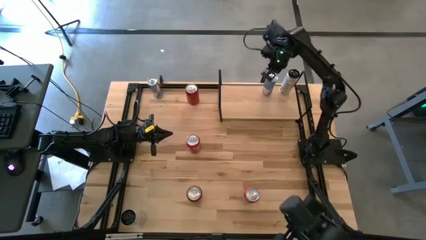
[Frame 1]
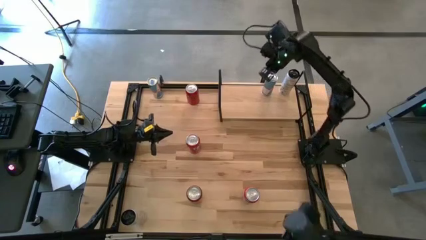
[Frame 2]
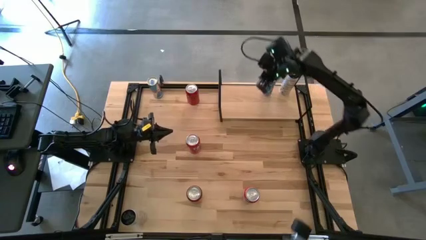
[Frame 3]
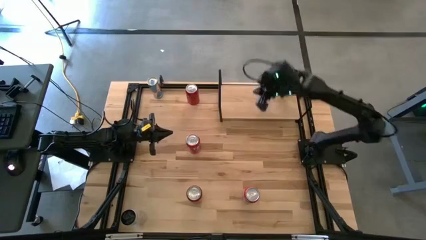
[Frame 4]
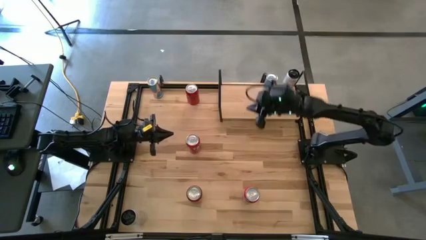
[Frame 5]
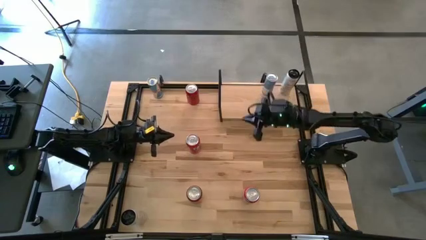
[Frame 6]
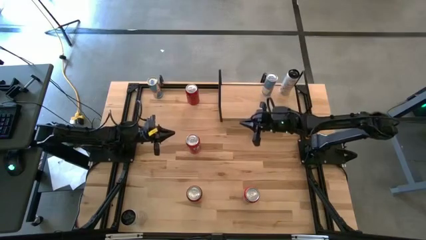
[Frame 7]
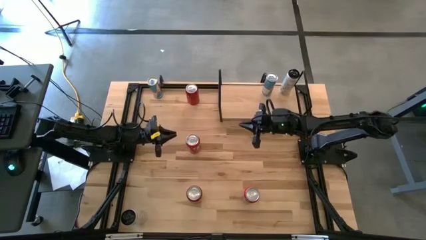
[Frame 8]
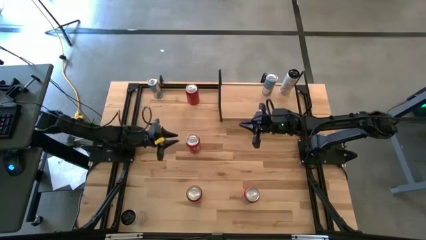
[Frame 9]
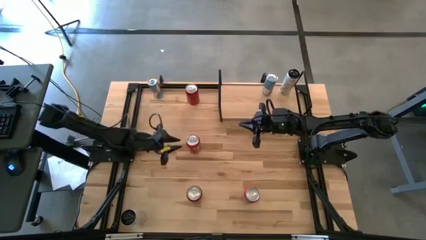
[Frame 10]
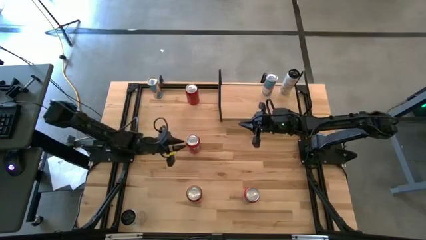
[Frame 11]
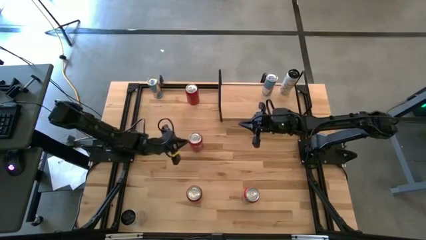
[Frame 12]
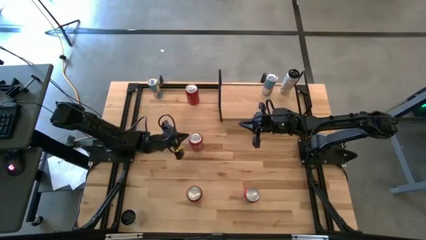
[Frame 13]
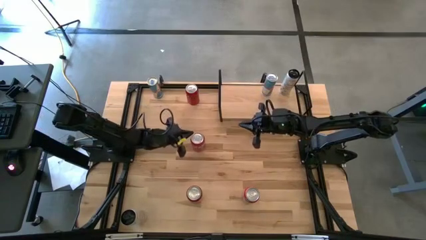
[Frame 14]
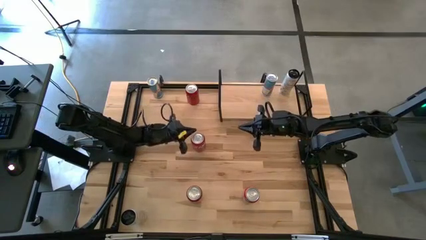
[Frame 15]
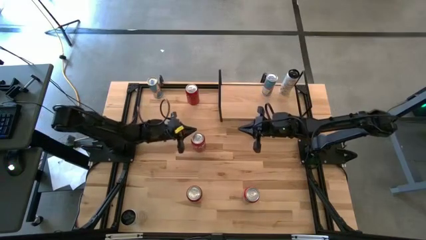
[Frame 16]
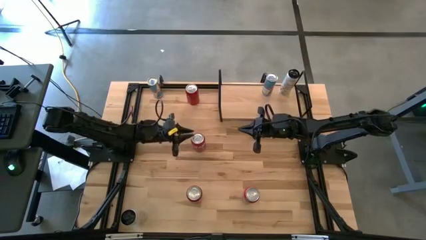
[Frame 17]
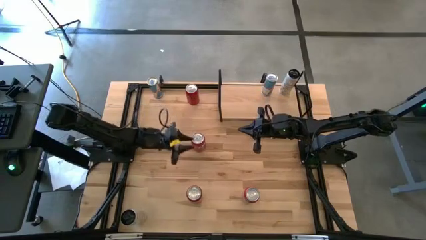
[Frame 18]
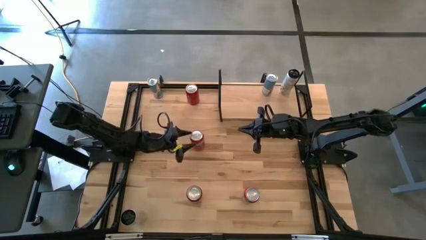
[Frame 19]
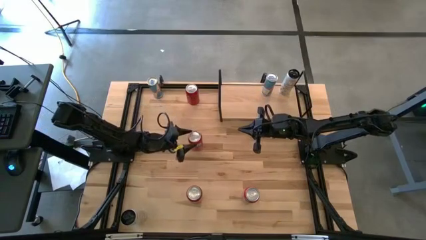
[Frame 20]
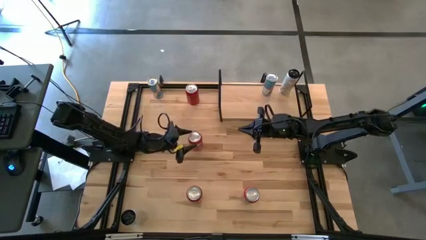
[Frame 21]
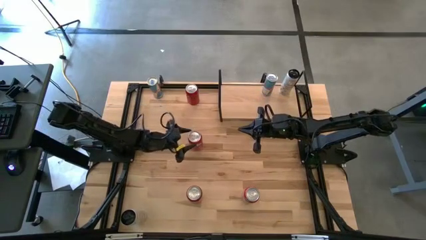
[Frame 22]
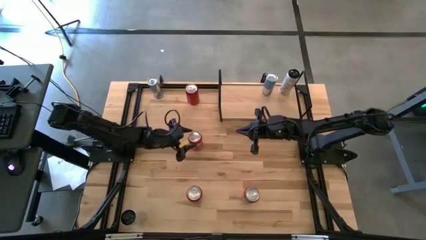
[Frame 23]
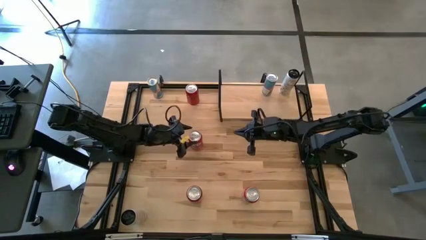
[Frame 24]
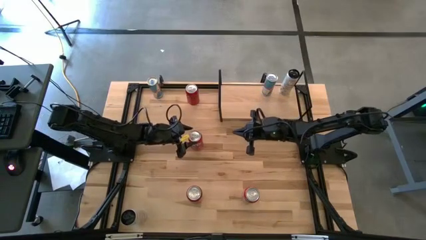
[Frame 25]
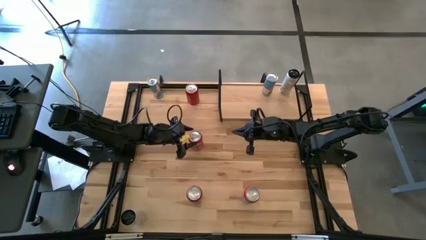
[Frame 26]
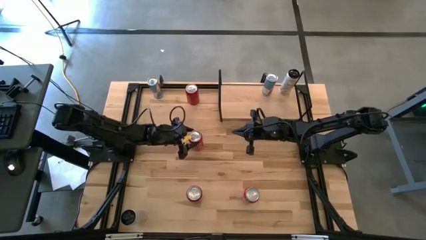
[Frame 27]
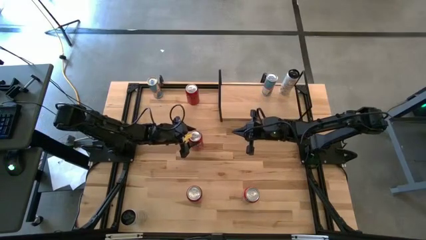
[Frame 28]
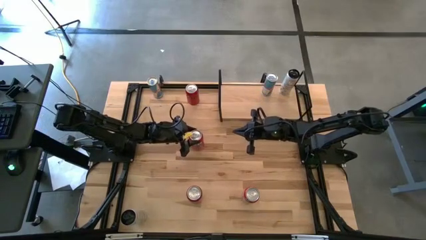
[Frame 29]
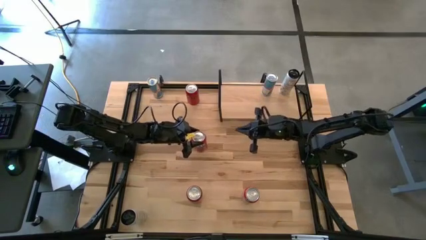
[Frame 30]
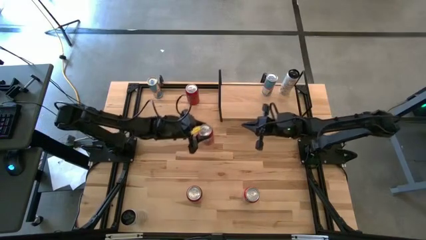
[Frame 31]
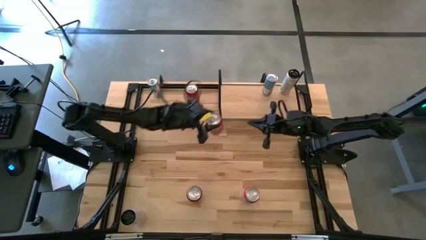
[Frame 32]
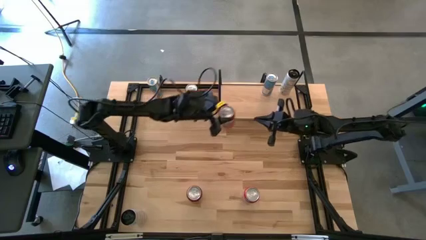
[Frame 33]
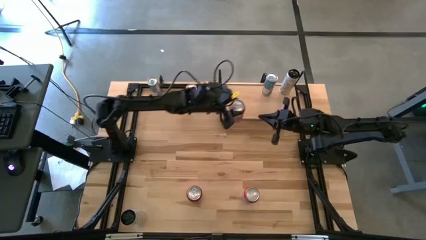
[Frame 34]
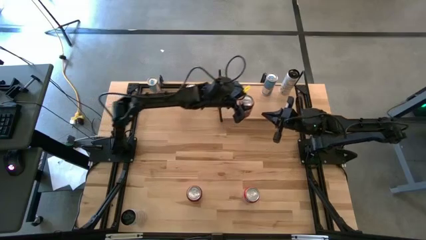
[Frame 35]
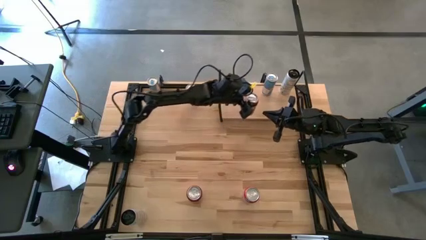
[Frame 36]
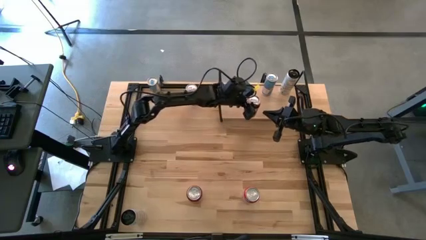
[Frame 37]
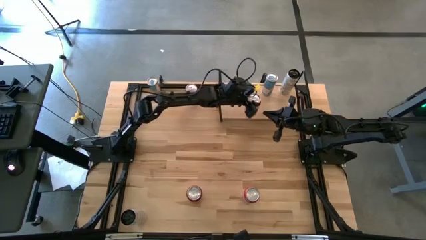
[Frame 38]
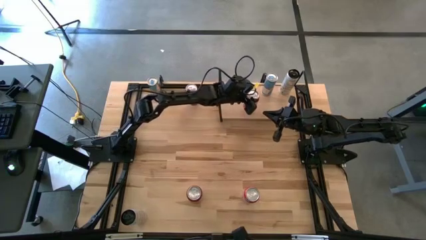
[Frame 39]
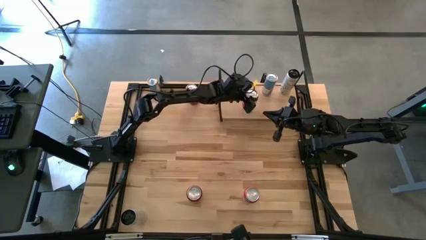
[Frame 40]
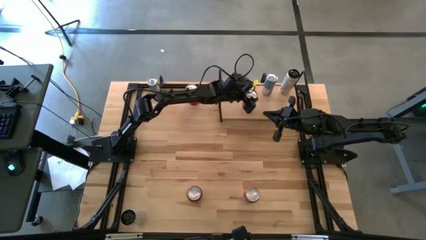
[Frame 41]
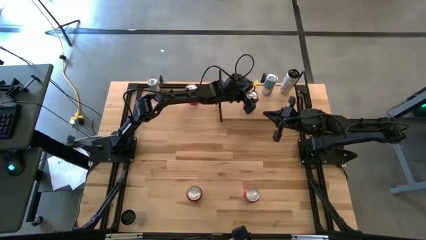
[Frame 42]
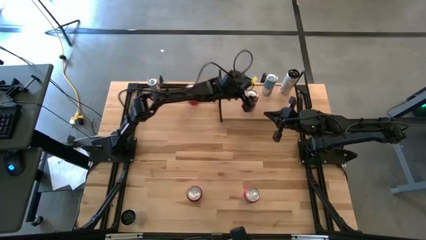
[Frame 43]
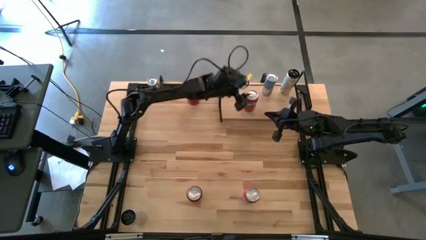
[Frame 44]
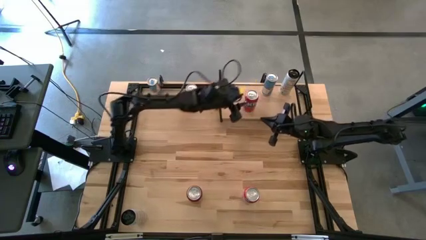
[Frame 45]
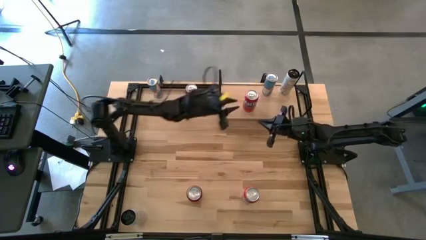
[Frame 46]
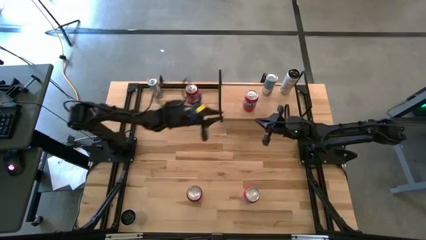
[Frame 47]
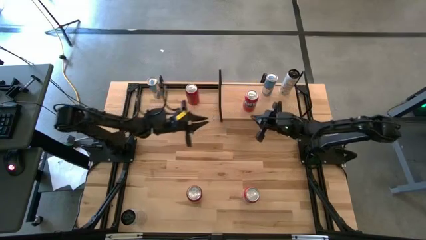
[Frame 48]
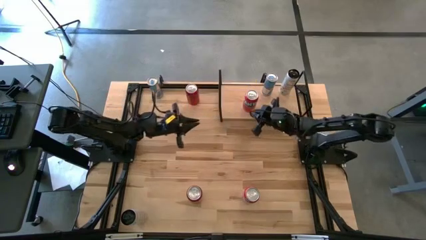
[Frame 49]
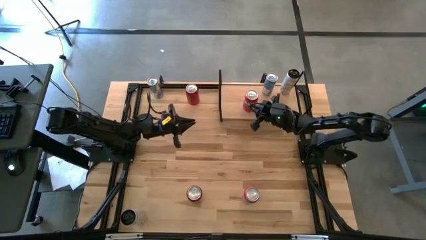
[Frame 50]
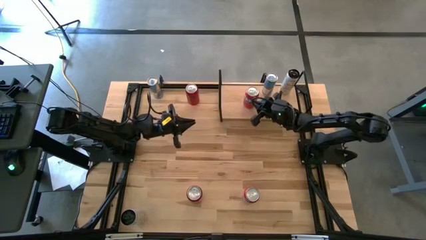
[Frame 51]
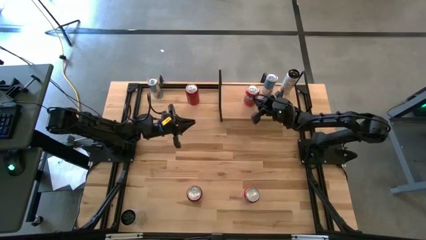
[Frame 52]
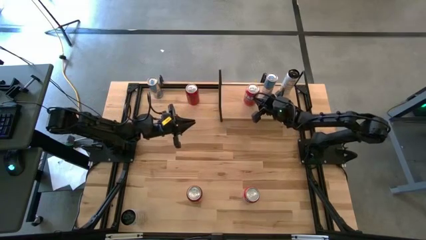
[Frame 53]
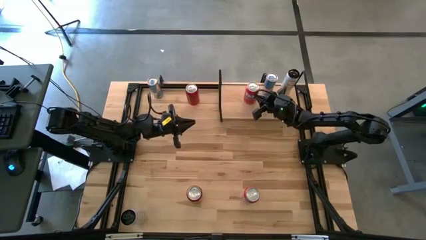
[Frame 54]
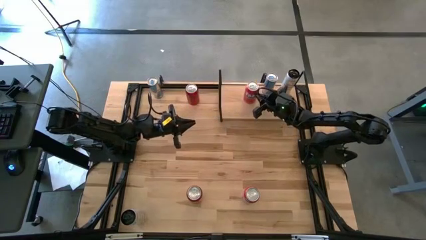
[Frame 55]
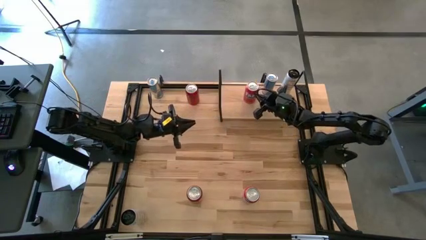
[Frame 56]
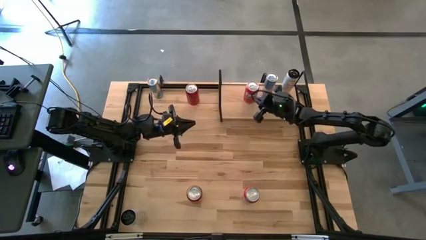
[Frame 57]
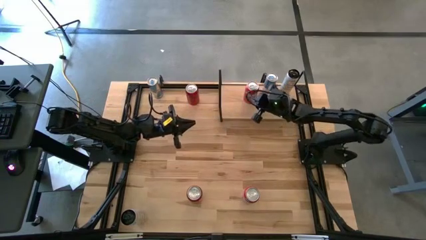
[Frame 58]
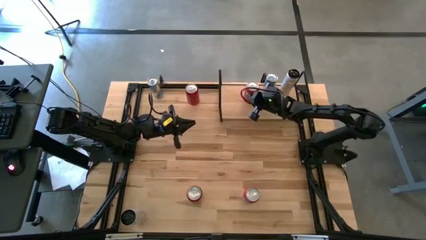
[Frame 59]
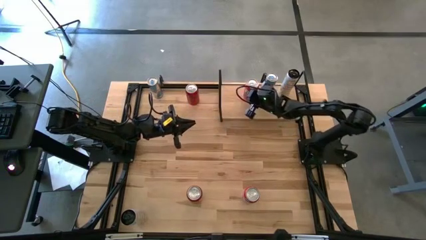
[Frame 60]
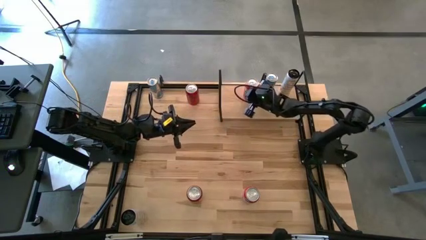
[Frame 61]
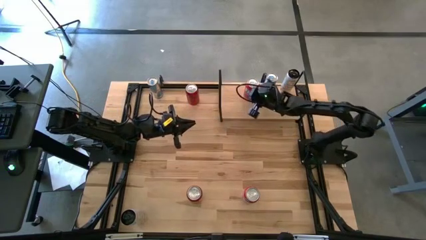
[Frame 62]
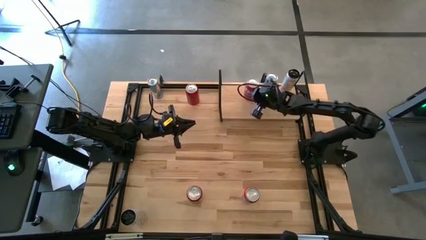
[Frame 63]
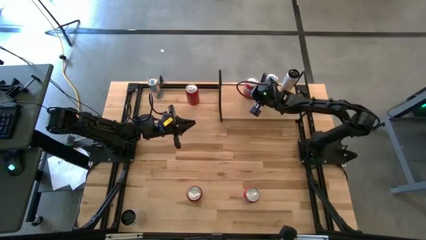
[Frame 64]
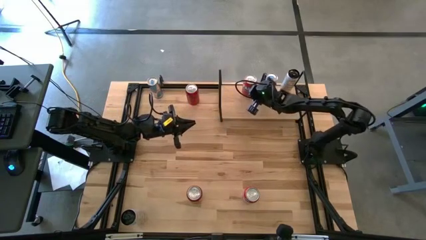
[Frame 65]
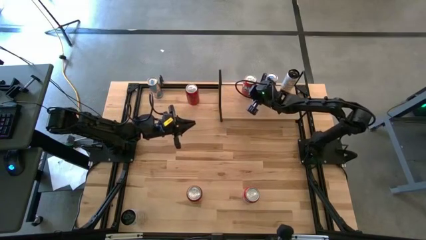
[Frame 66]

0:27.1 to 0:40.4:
Task: Place canned beverage on shelf
Put the top red soda can on the shelf
